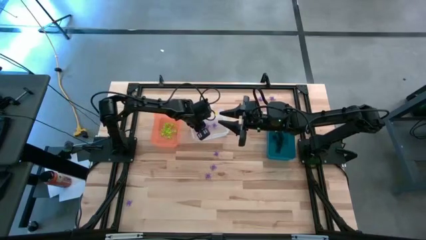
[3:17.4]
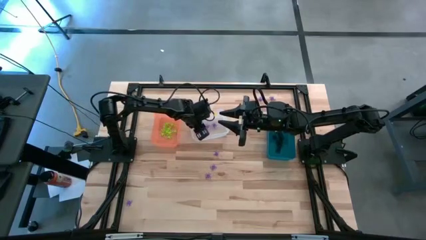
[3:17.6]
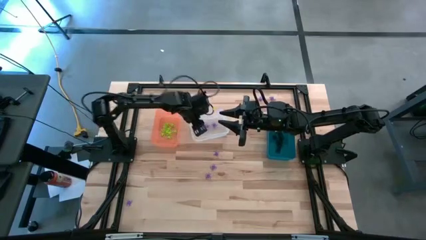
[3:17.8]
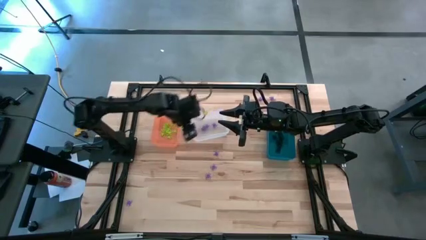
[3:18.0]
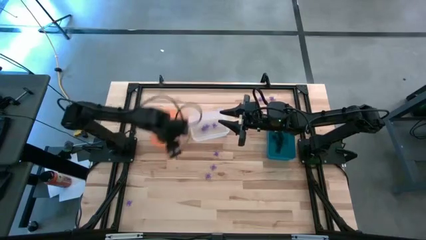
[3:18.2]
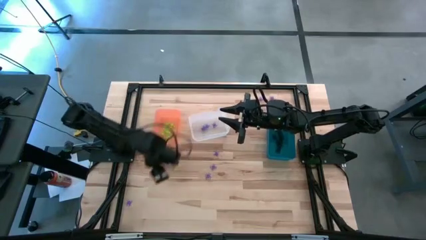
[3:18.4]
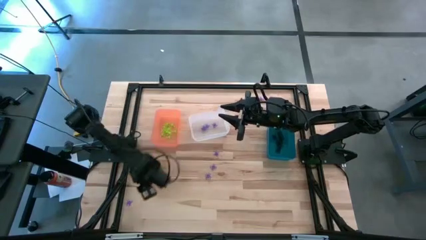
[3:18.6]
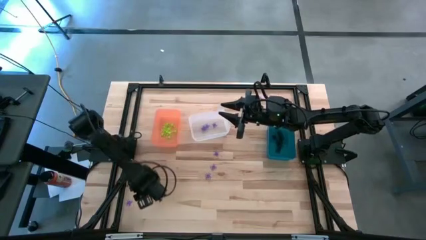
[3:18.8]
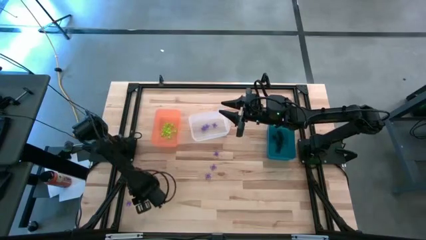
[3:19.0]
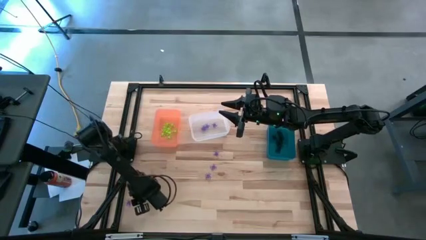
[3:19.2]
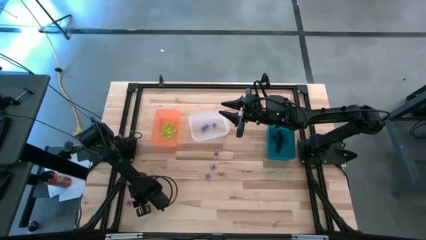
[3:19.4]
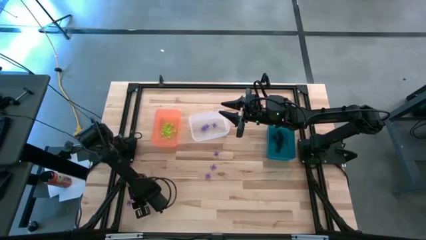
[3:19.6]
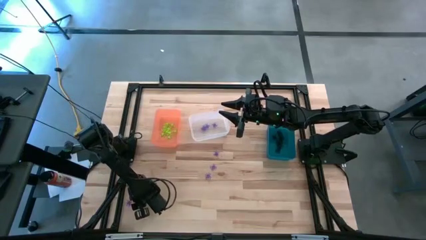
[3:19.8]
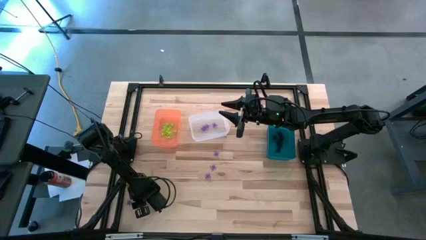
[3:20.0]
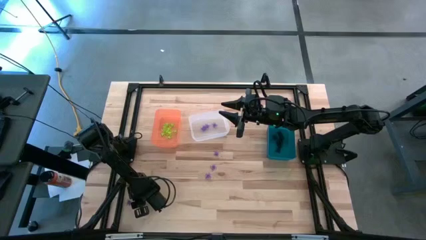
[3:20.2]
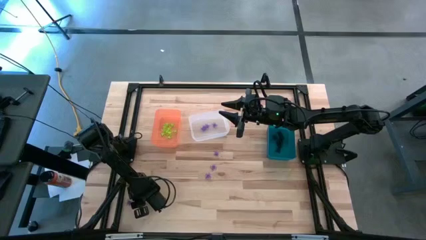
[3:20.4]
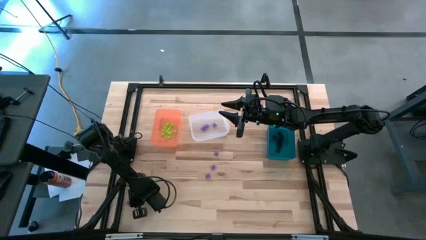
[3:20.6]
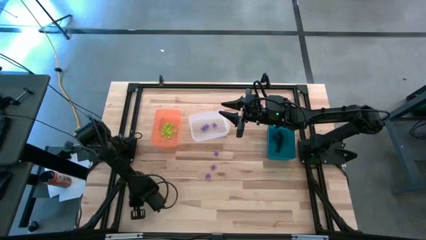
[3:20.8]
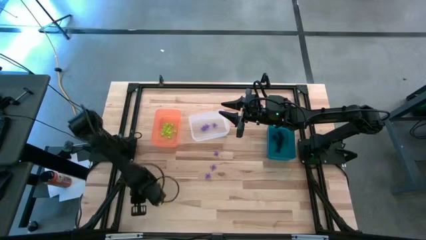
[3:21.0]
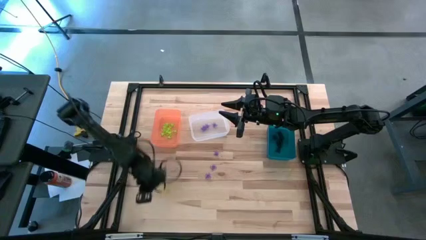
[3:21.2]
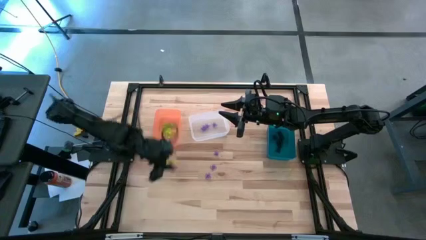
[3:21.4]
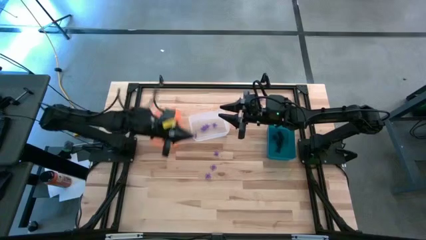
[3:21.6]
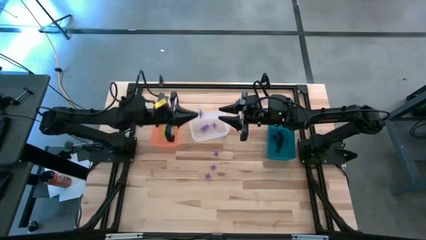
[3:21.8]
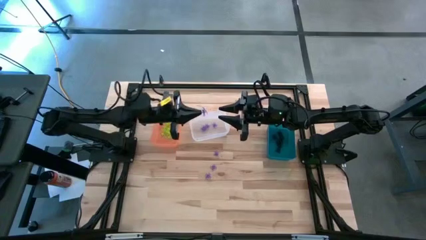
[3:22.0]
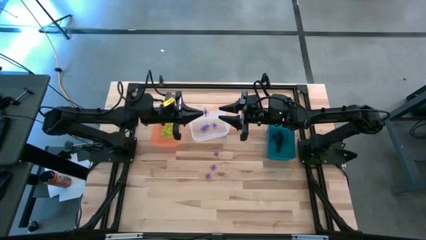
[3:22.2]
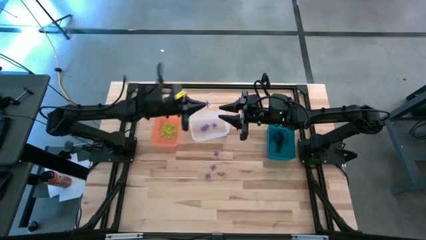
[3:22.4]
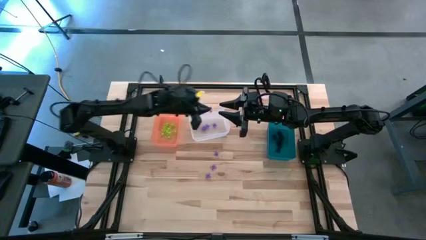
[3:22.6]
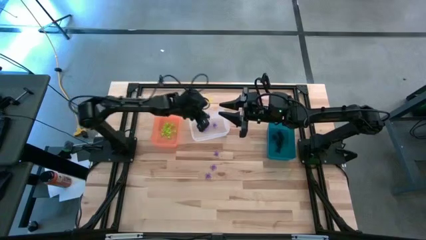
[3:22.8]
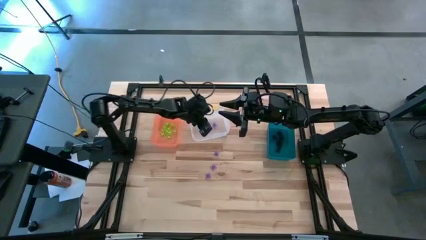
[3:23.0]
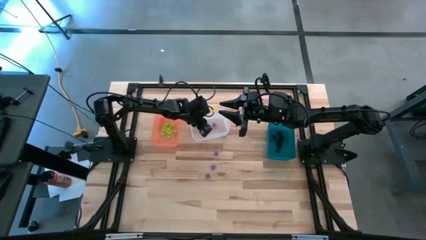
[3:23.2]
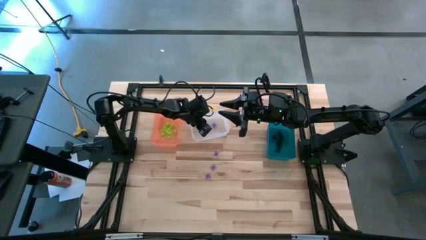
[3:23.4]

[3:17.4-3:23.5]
Task: Sort Halloween decoration
Put the purple spider toy into the transparent bin

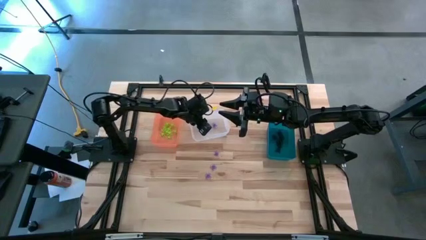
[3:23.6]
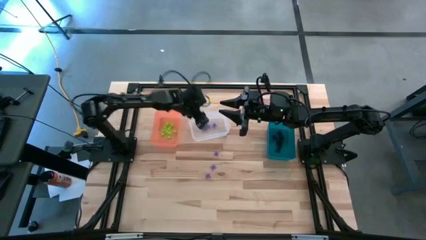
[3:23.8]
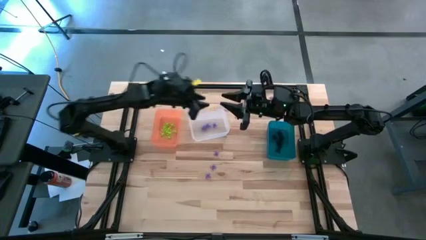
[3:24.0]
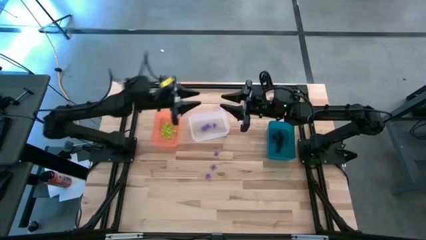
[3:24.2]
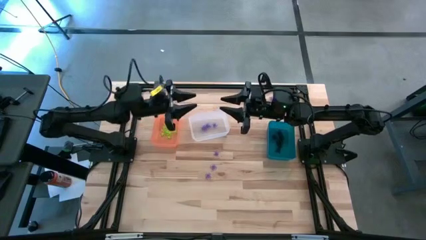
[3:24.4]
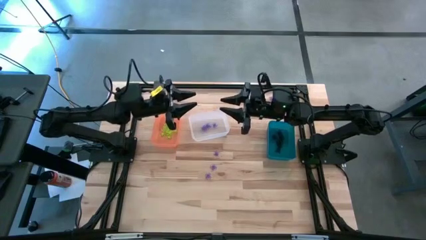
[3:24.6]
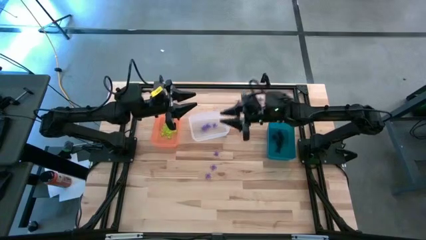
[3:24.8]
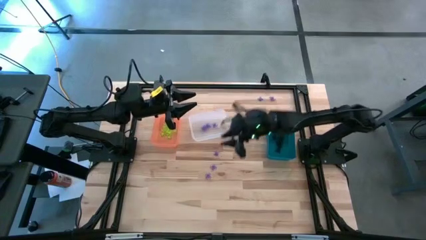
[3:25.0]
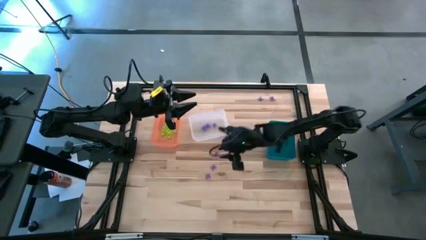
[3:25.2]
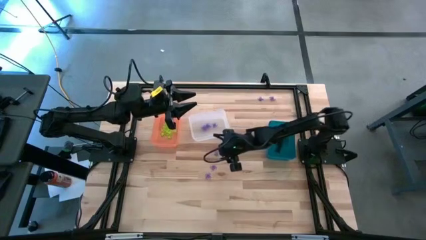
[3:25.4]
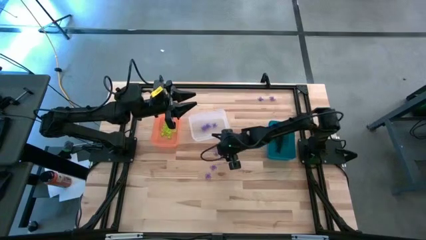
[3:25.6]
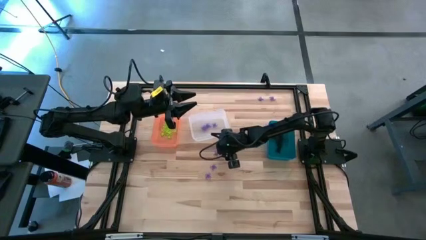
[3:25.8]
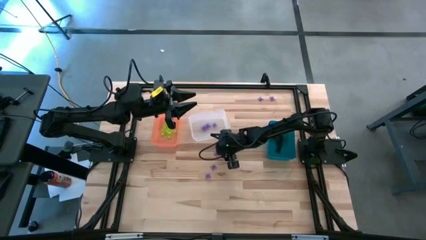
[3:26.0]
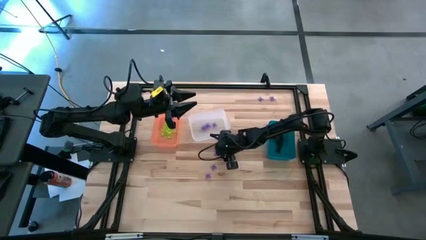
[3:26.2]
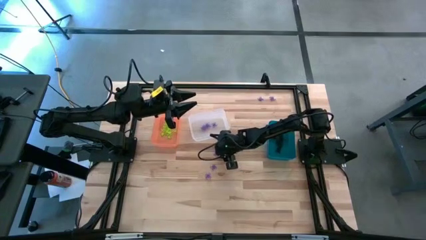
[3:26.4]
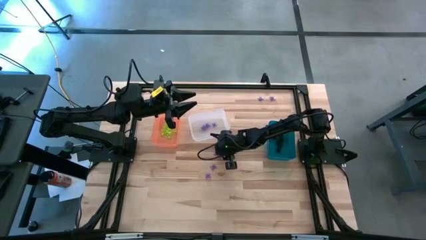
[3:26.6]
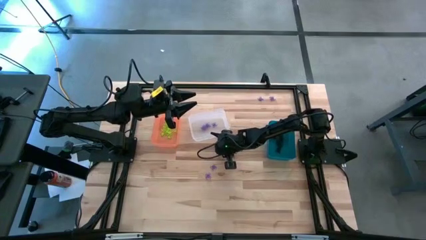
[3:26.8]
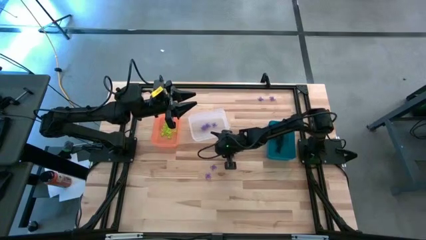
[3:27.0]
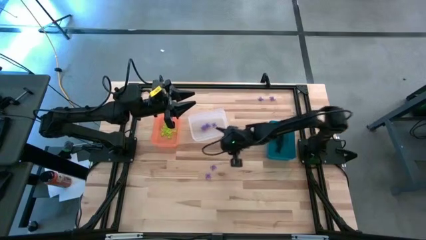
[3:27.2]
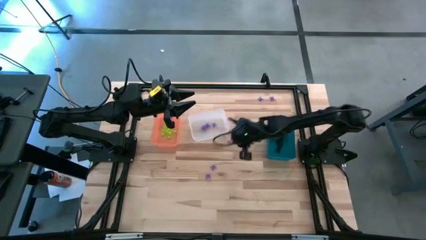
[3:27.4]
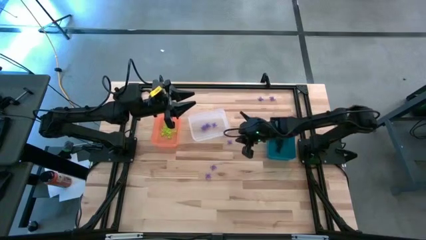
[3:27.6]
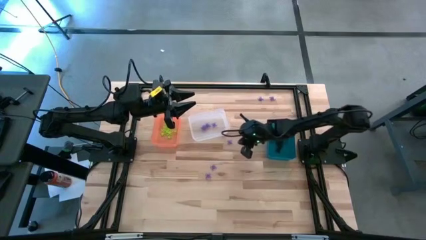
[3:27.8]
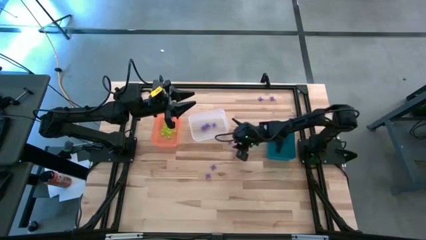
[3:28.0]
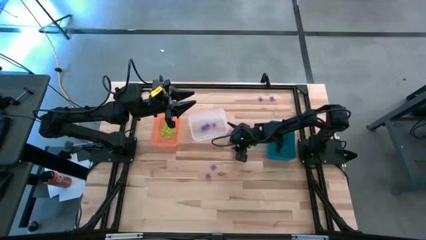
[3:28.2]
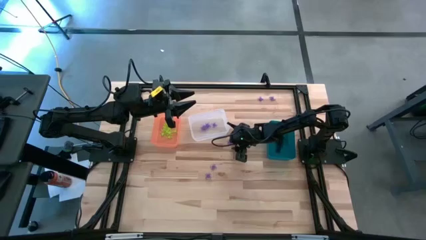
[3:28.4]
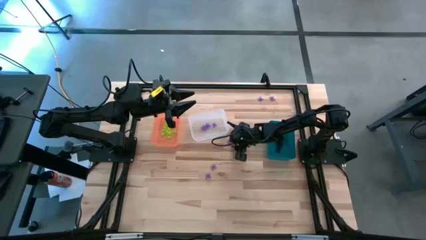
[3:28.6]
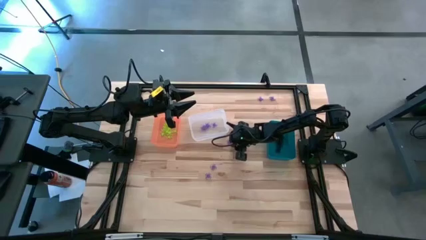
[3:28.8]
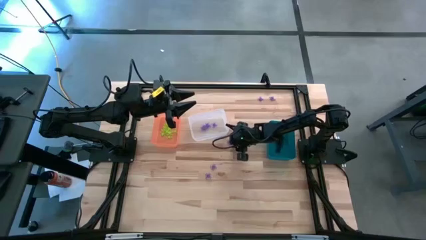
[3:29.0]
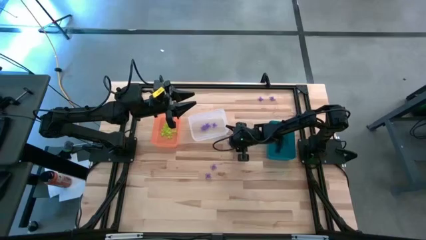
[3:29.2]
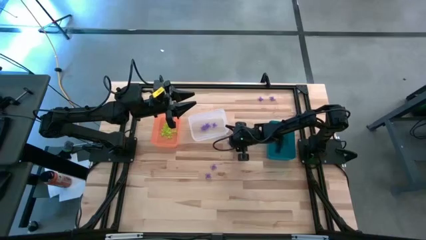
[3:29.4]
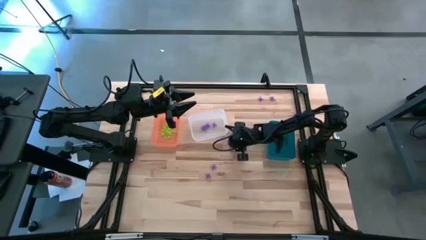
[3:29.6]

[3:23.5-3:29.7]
Put the purple spider toy into the transparent bin

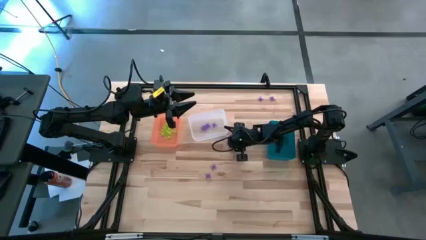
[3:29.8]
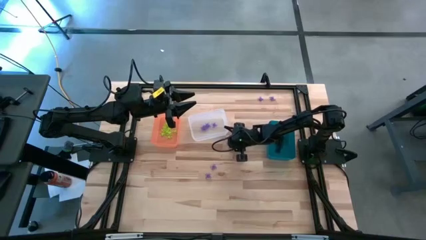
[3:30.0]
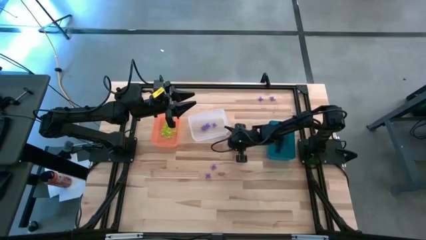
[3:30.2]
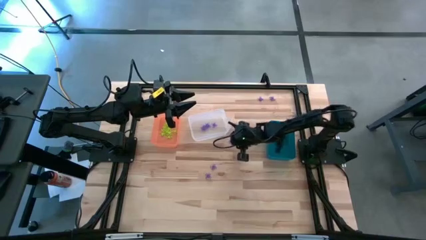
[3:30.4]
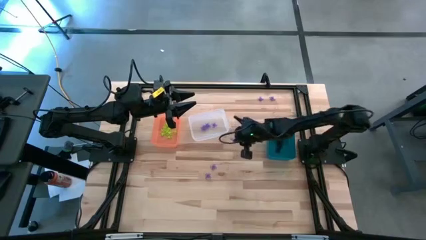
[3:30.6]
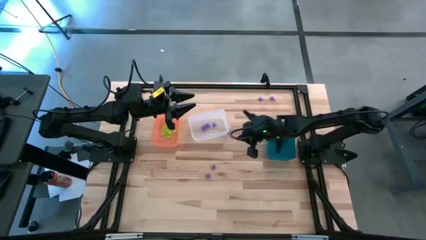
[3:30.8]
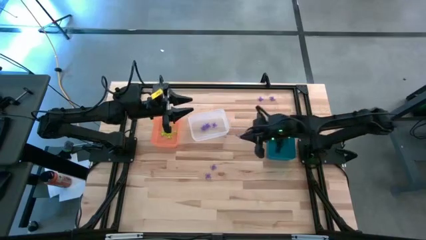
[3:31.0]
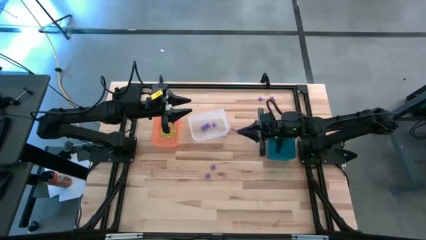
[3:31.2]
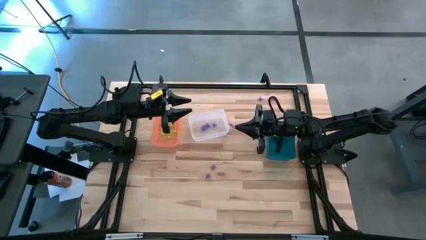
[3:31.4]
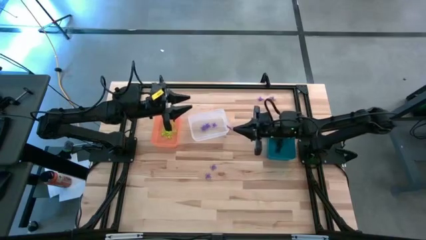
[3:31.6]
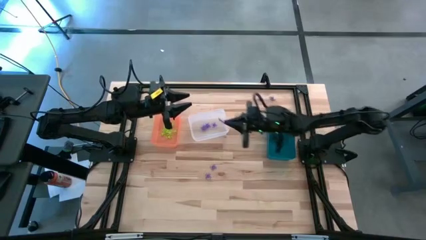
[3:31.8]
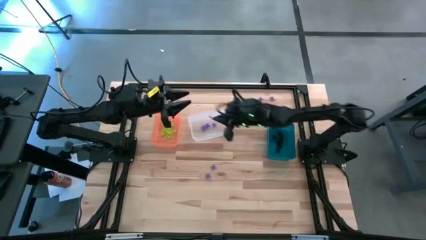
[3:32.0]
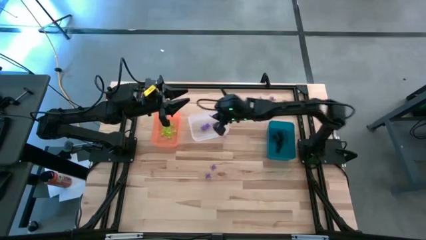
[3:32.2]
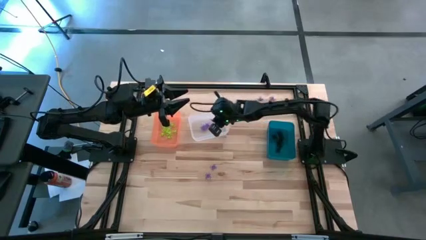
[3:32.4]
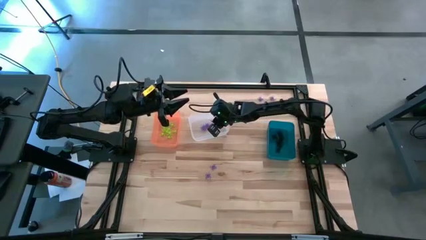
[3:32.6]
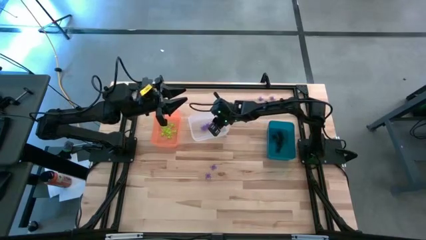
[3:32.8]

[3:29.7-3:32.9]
Put the purple spider toy into the transparent bin

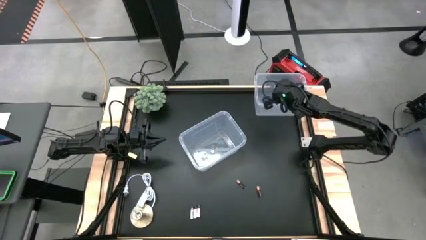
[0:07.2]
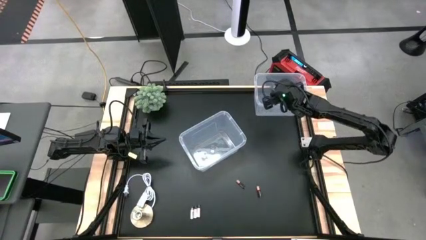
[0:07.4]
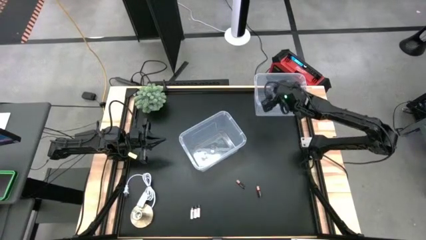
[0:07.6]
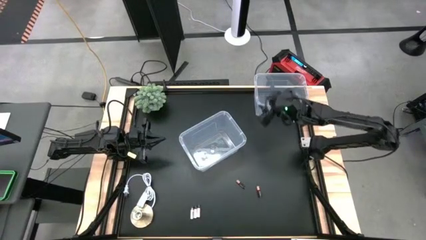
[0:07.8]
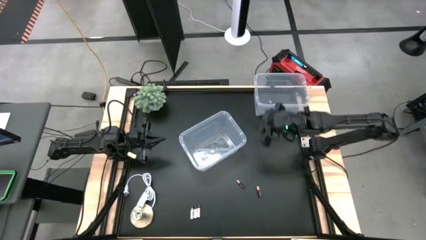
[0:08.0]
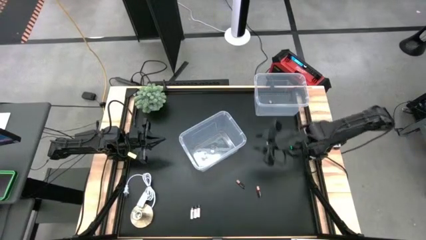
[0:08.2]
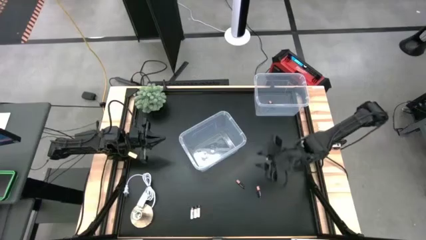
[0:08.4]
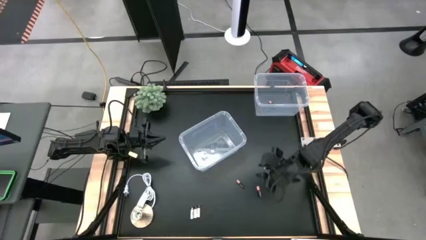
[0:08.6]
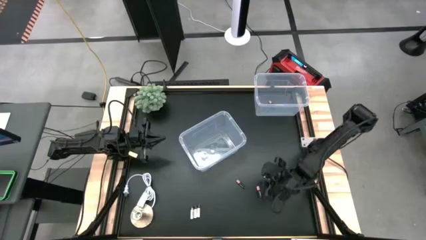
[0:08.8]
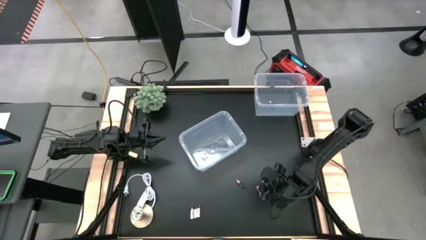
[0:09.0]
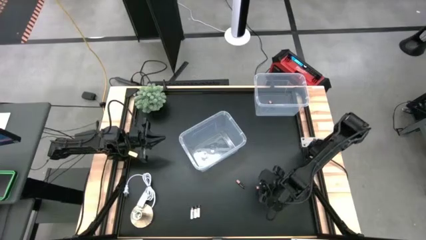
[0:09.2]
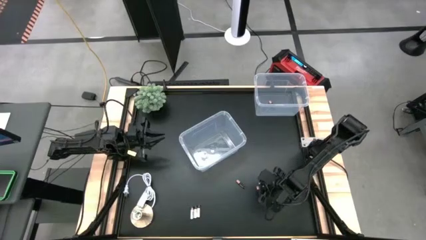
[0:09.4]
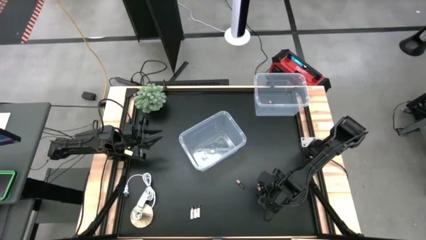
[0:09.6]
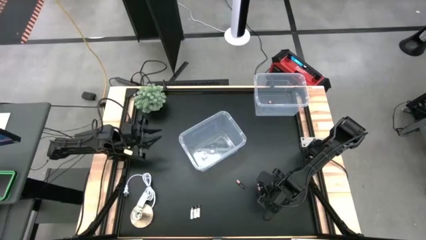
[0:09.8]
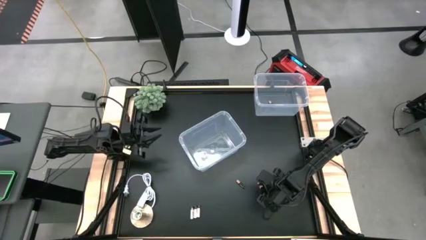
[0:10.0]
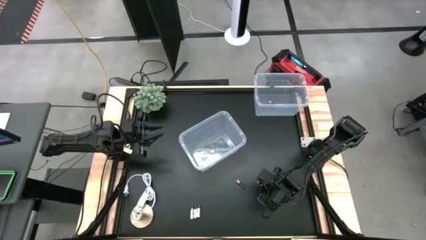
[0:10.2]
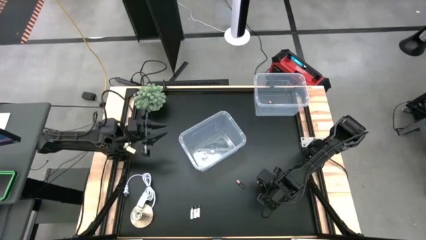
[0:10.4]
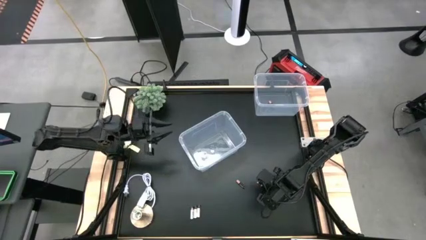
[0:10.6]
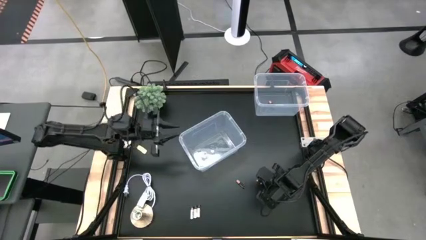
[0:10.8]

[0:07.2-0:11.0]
Task: Sort batteries
Put the right black battery into the top transparent bin
